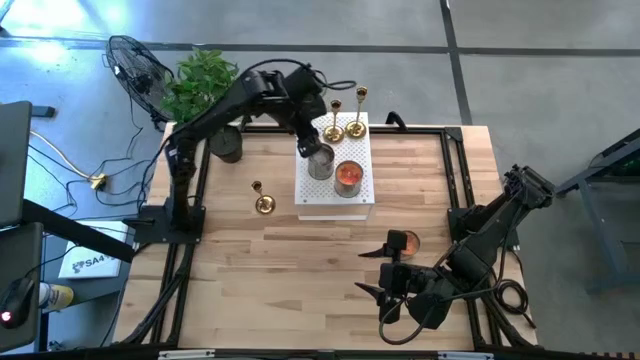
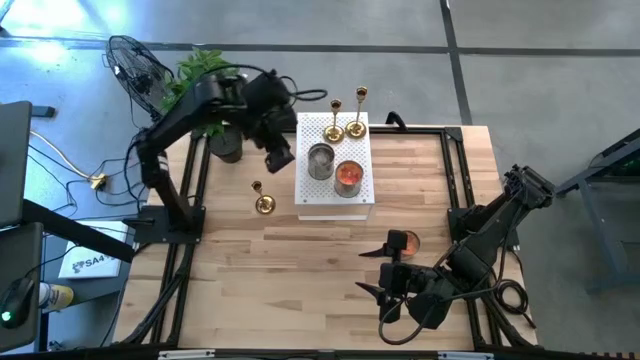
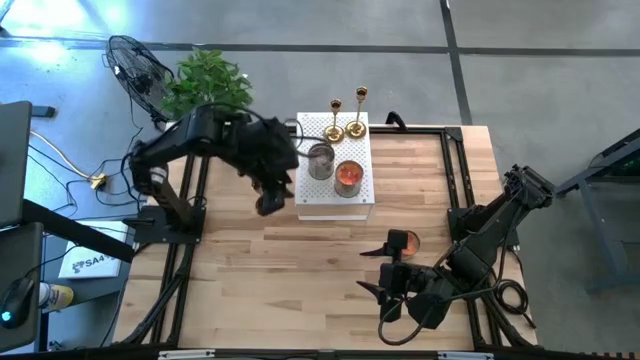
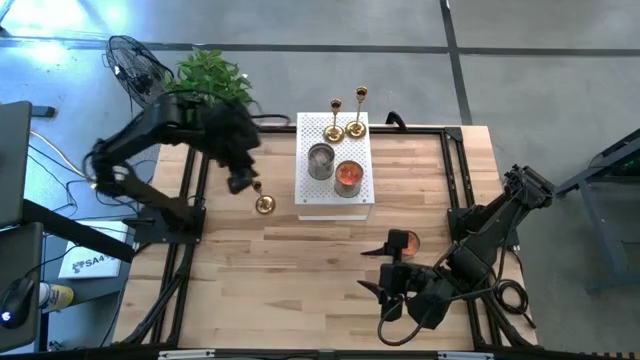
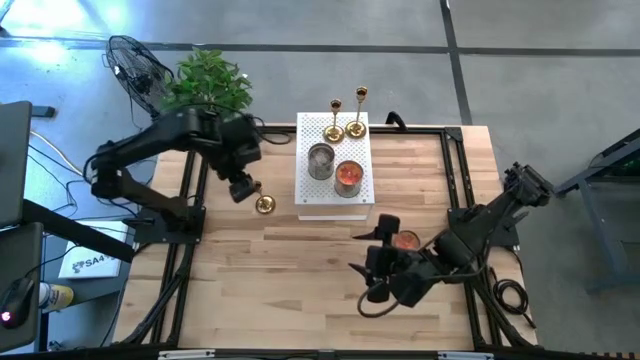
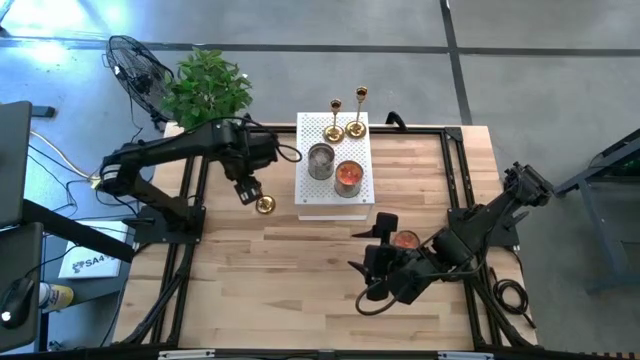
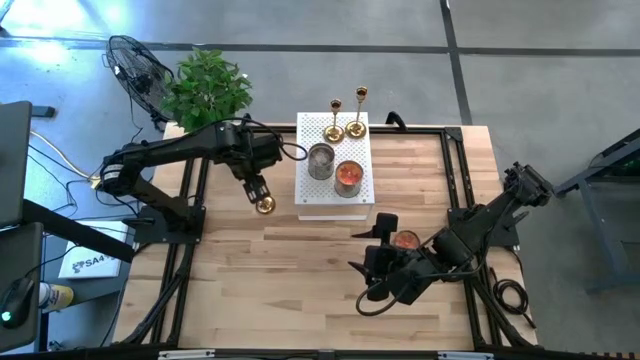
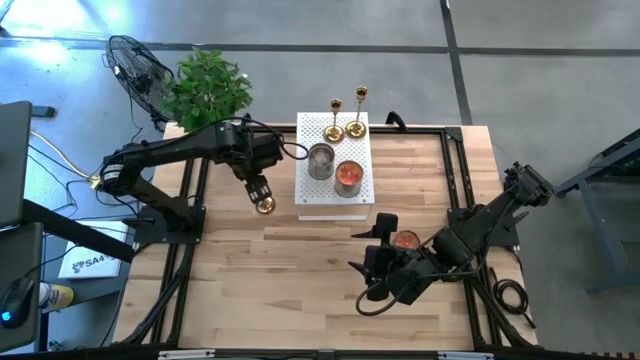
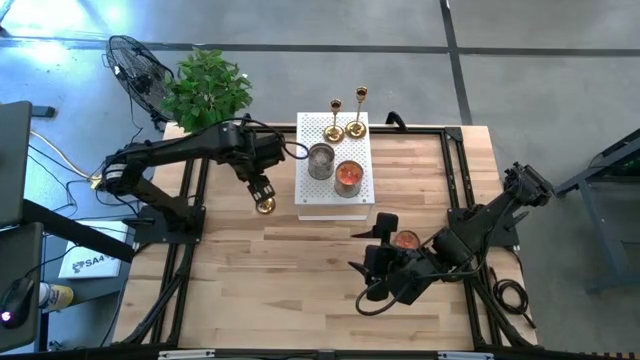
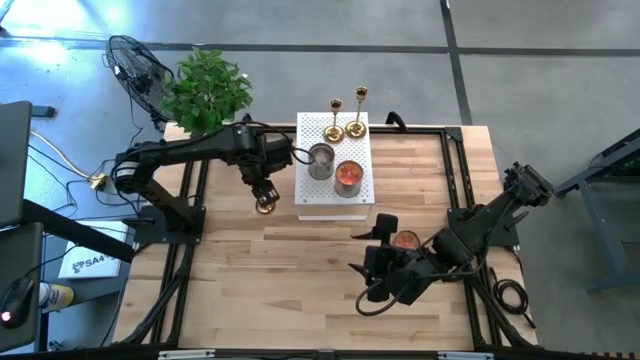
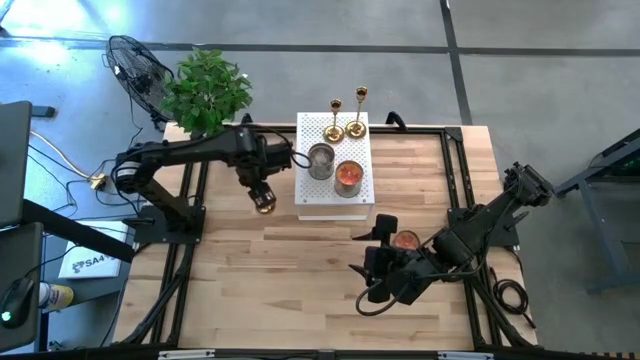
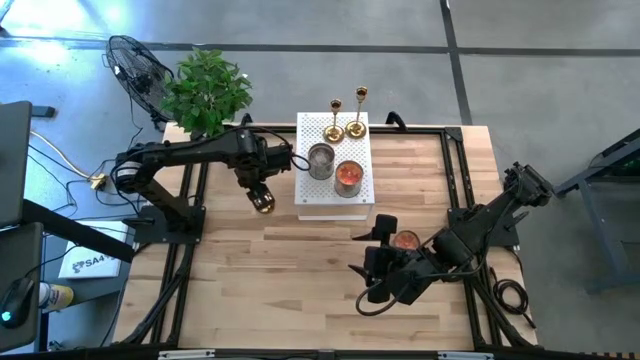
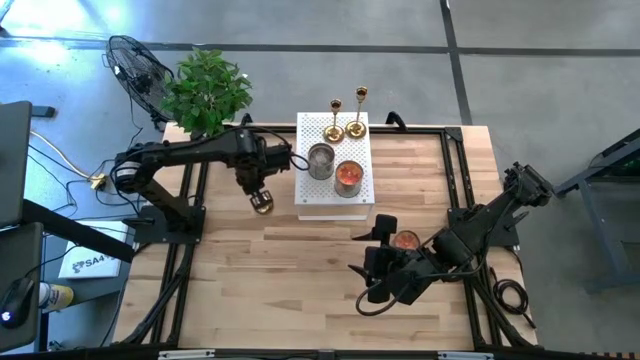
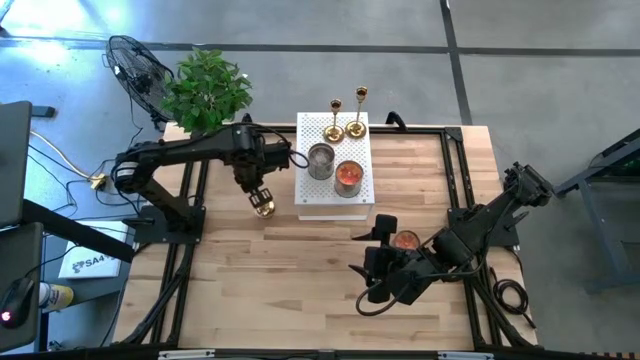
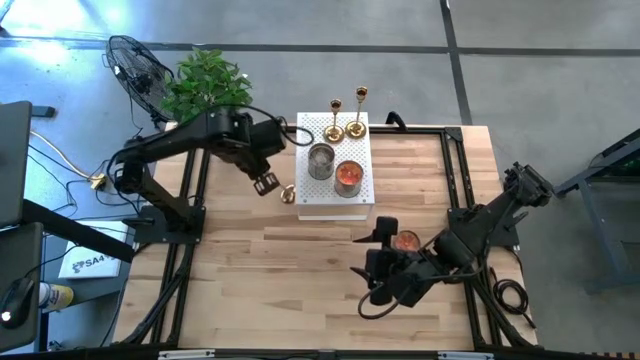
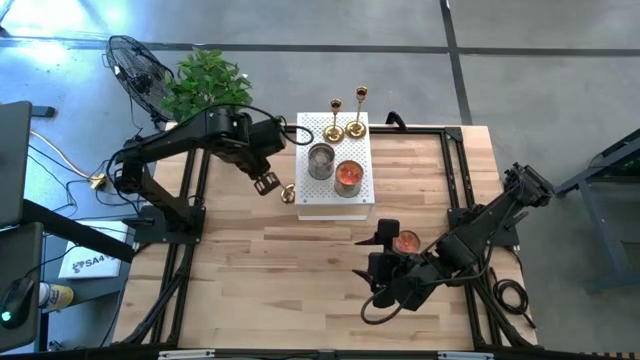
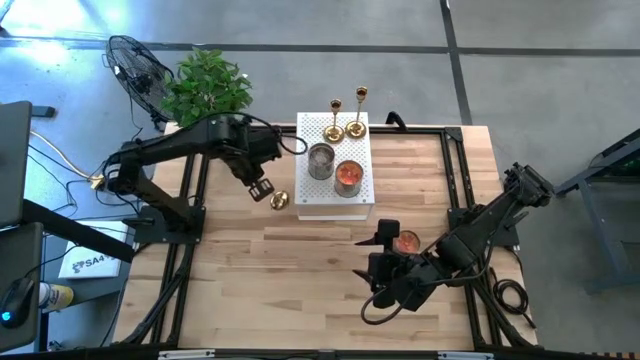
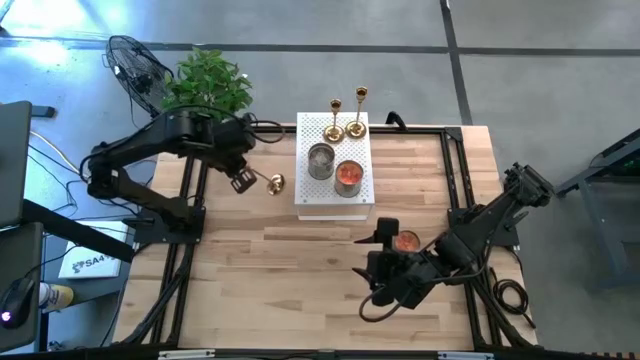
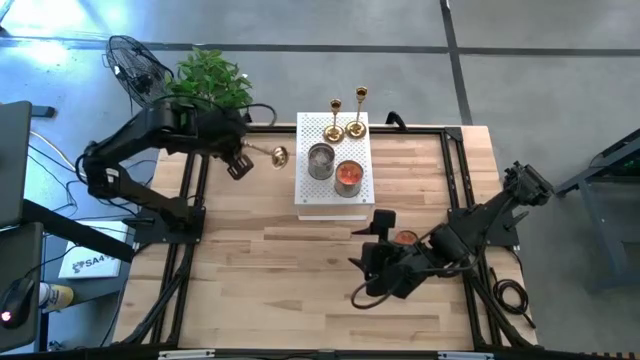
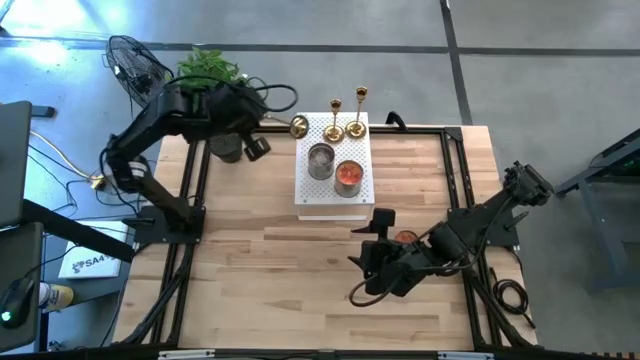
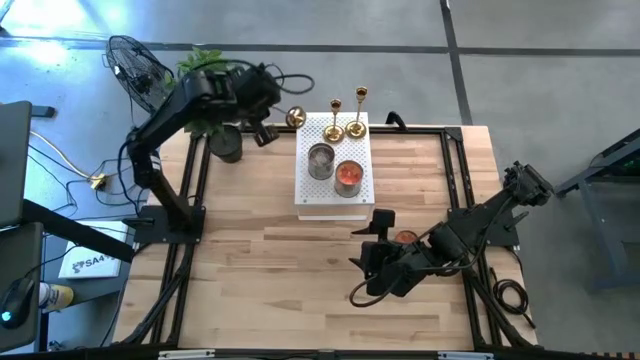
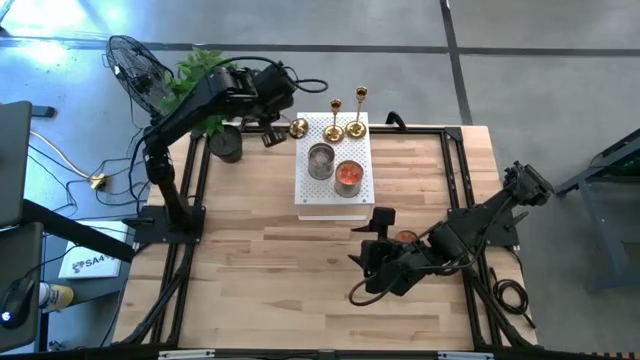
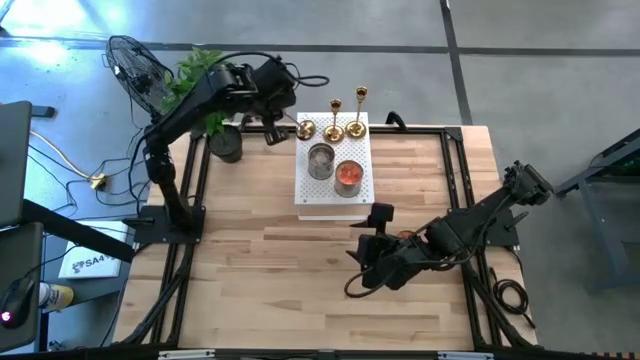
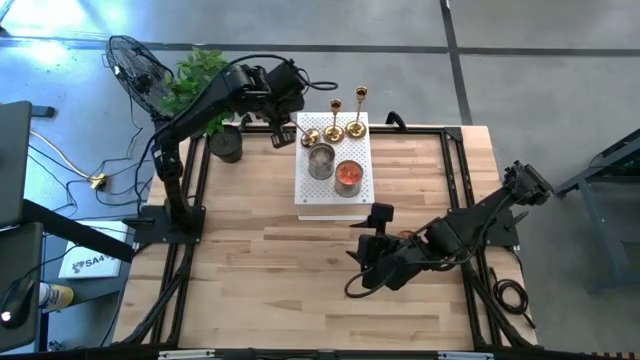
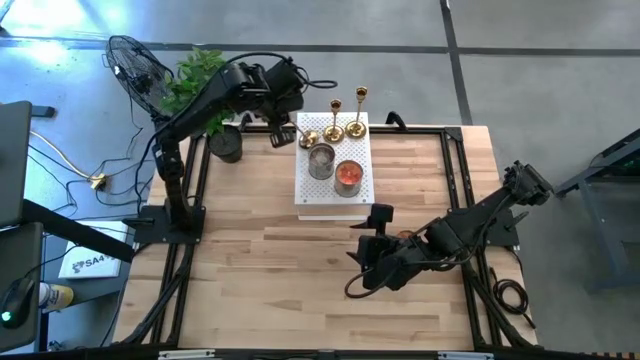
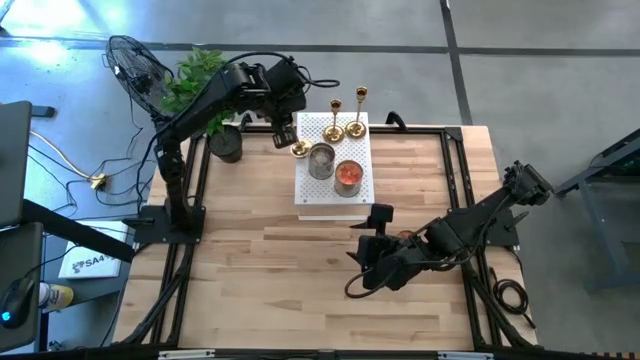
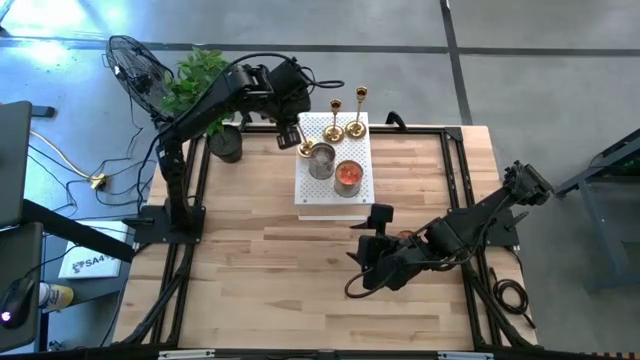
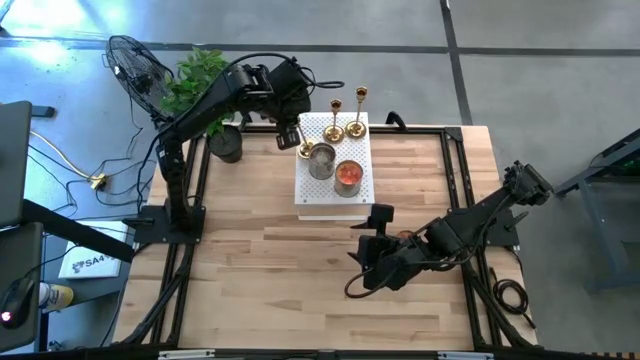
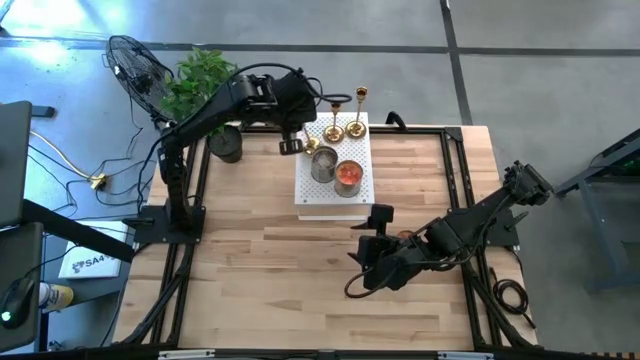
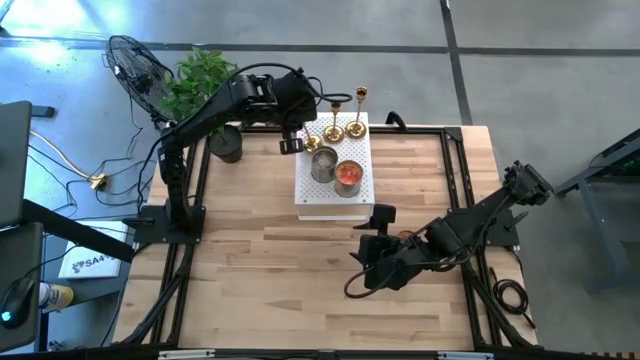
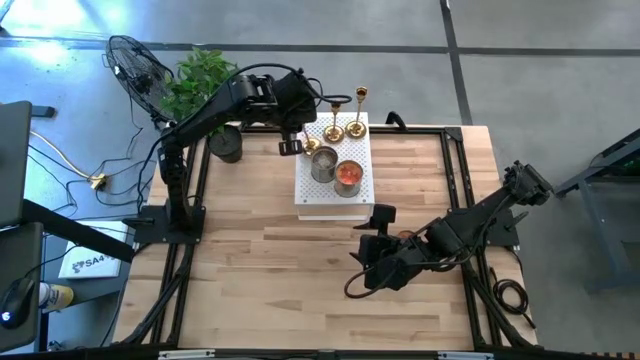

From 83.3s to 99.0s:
Task: Pick & Place candle stick holders
Put the golden candle holder on the shelf

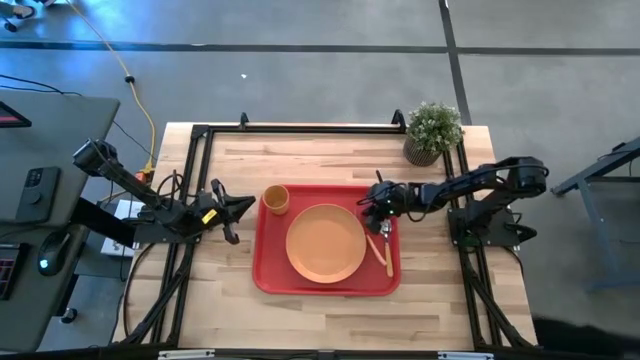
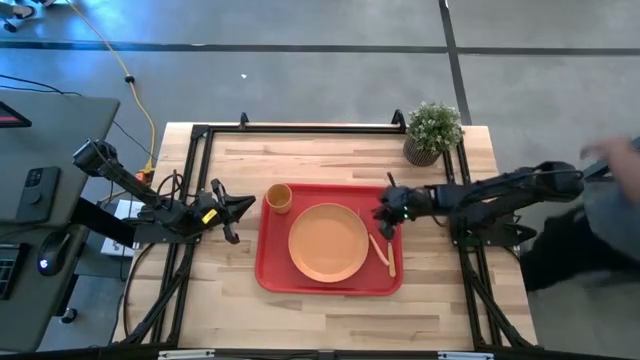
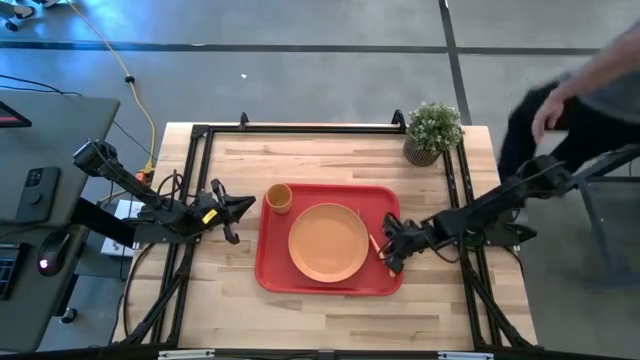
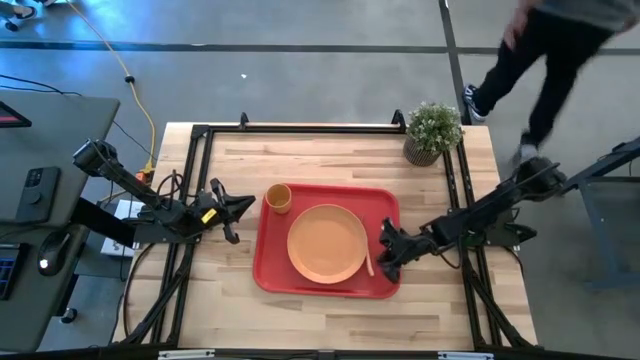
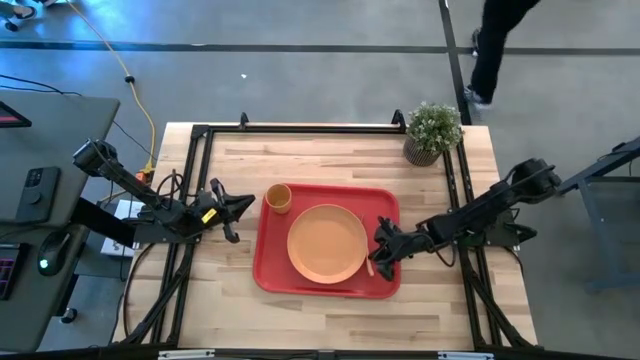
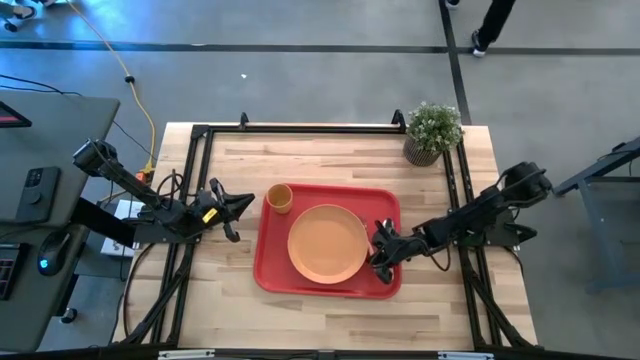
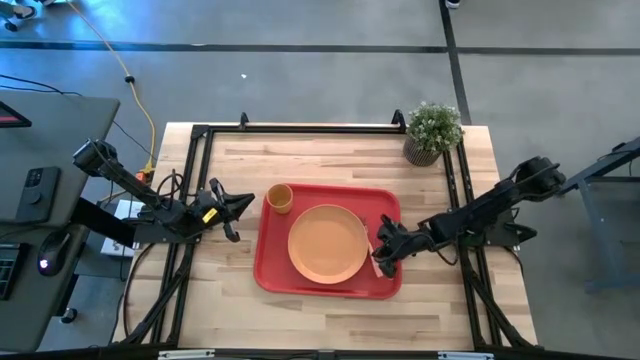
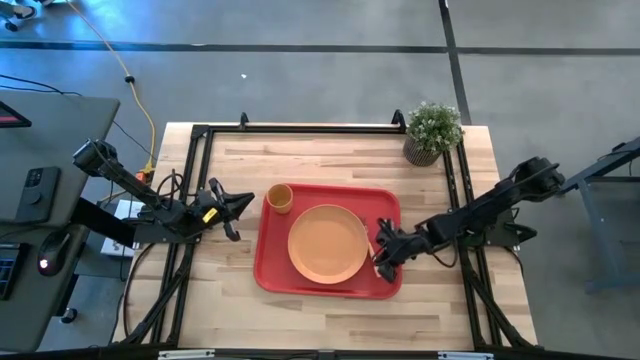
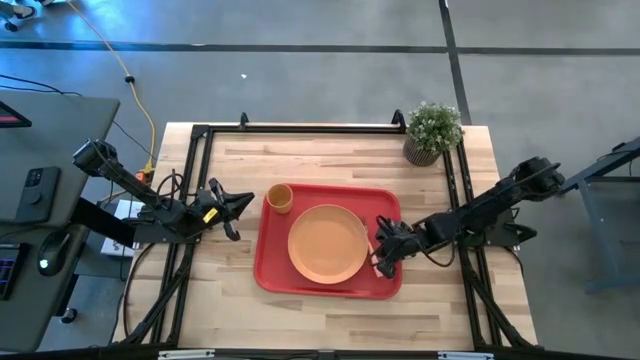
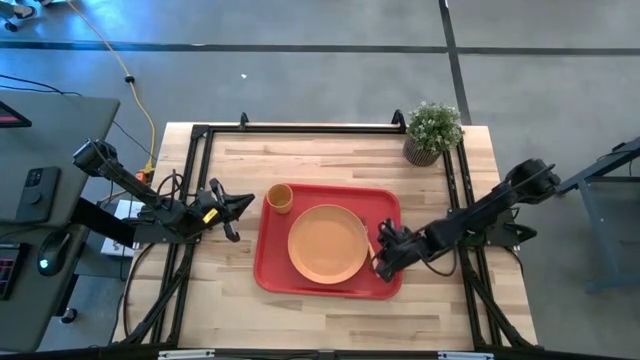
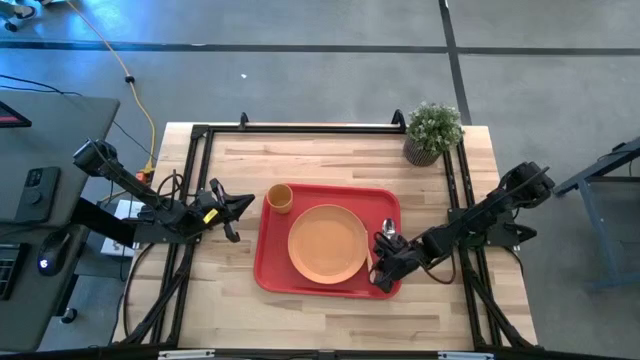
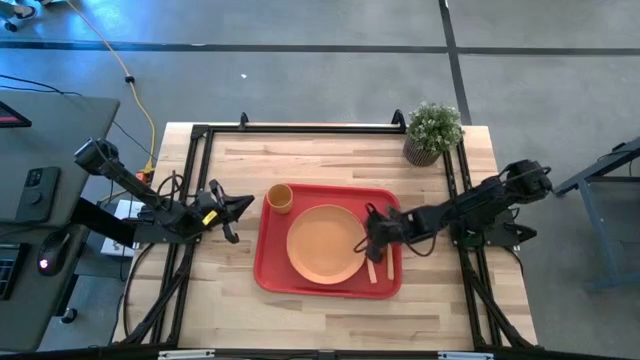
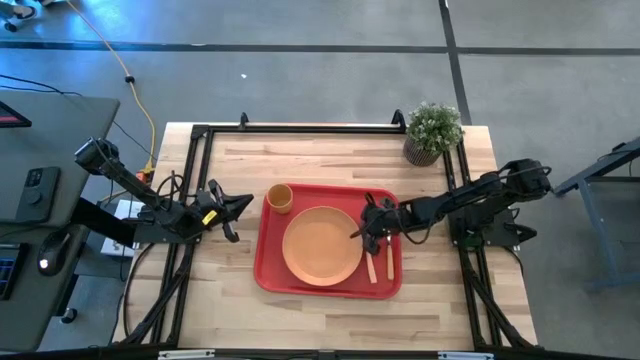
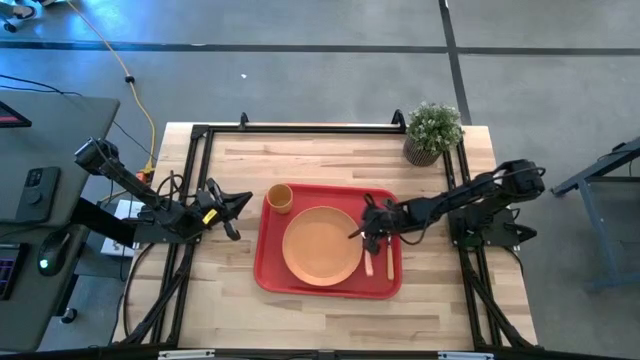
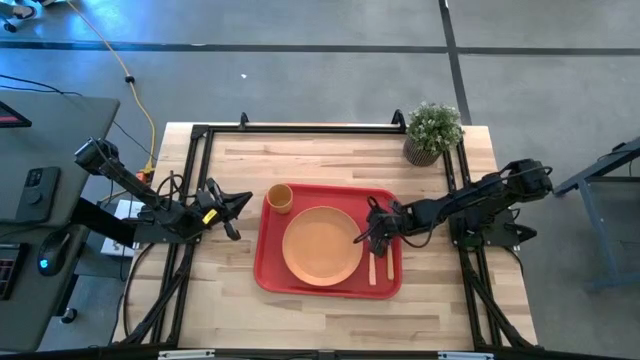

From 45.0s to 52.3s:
Task: Pick and place plate/cup/fork/spoon on tray
Adjust the orange fork
